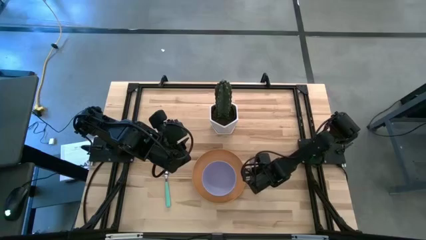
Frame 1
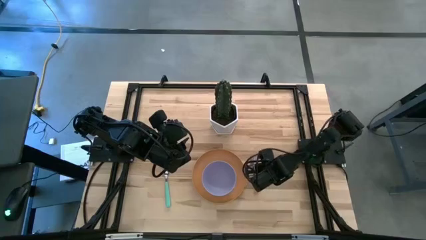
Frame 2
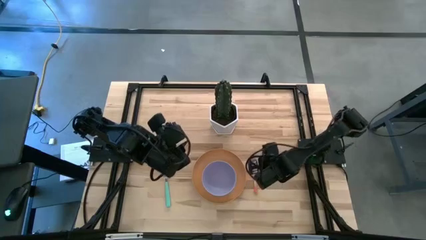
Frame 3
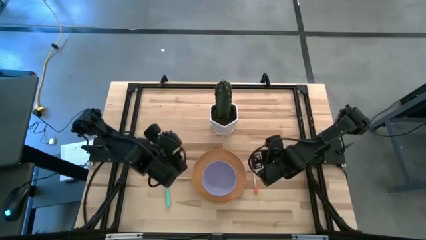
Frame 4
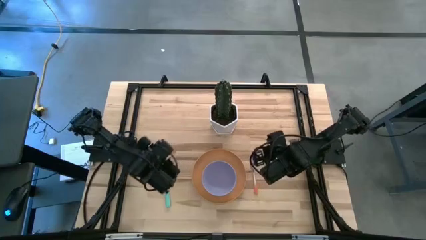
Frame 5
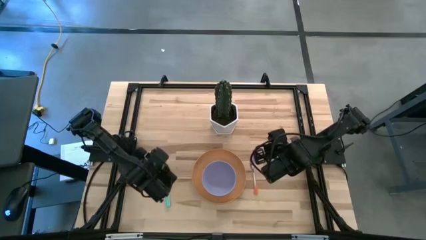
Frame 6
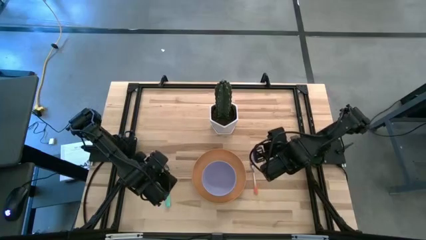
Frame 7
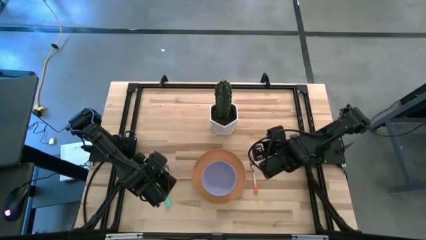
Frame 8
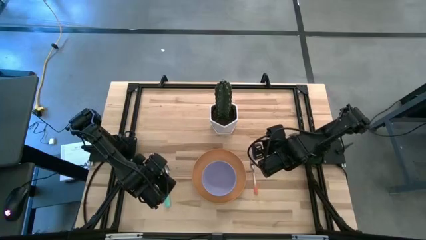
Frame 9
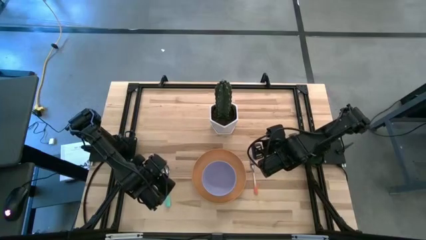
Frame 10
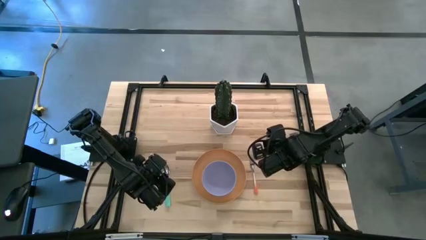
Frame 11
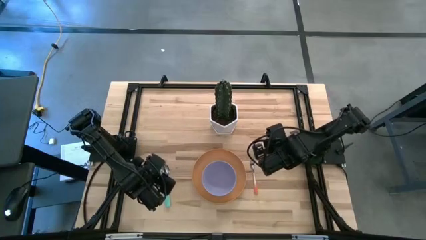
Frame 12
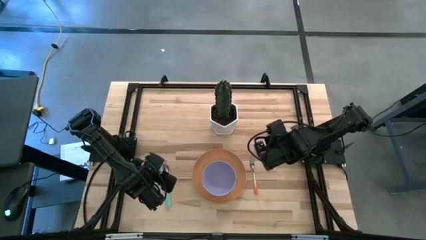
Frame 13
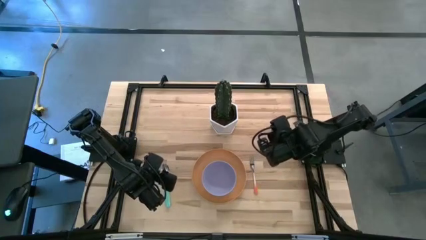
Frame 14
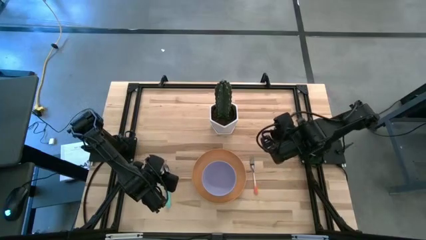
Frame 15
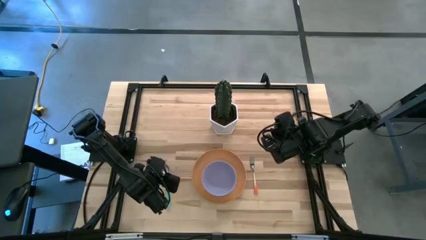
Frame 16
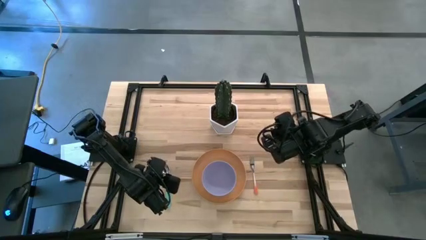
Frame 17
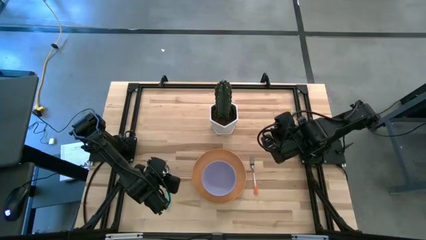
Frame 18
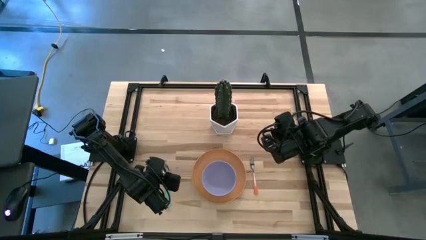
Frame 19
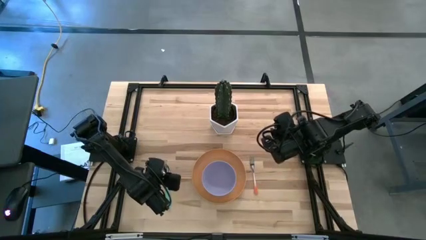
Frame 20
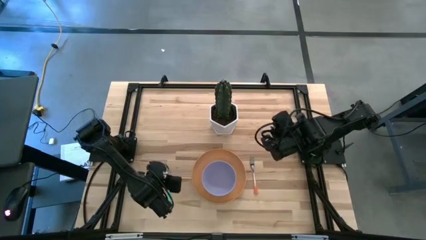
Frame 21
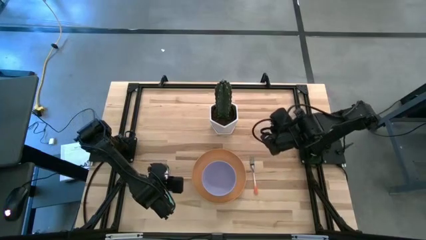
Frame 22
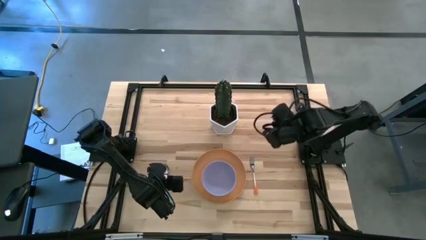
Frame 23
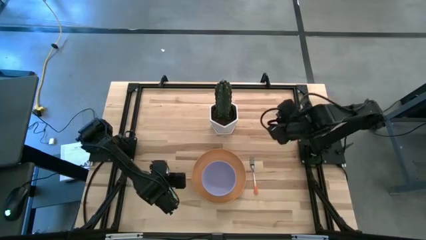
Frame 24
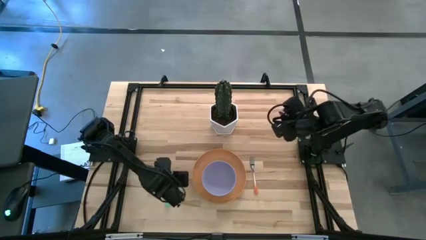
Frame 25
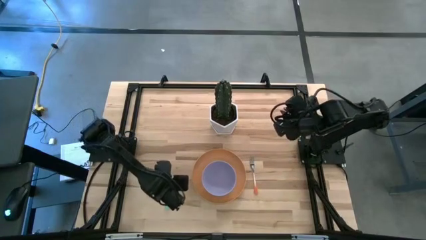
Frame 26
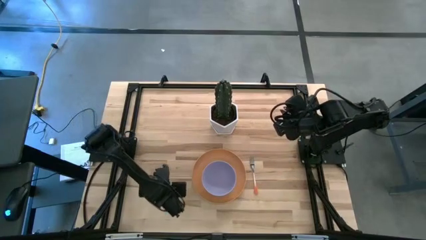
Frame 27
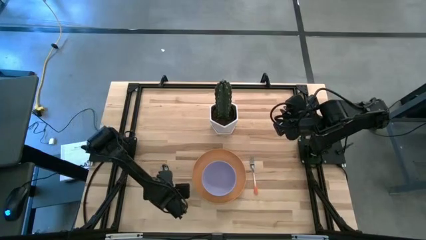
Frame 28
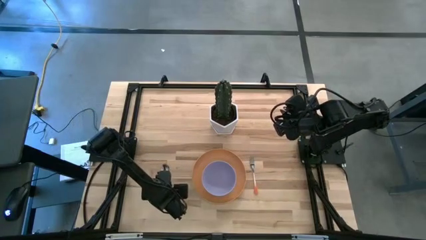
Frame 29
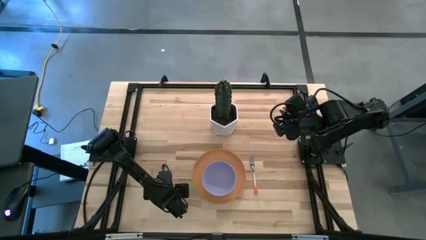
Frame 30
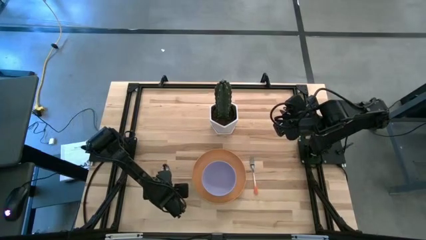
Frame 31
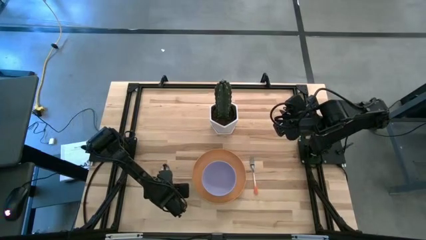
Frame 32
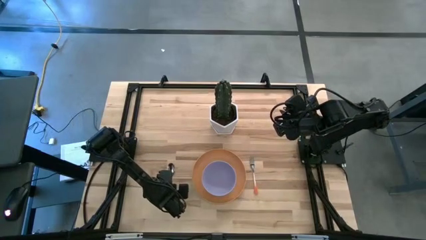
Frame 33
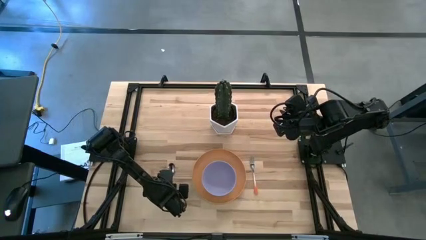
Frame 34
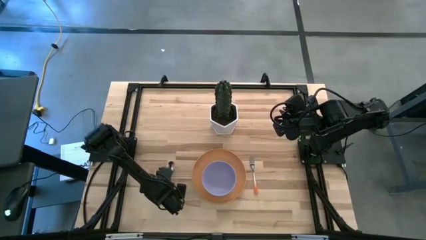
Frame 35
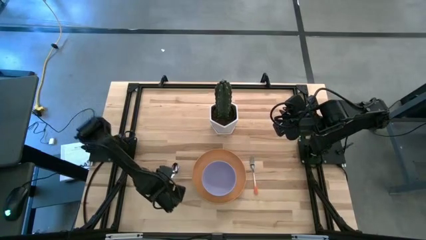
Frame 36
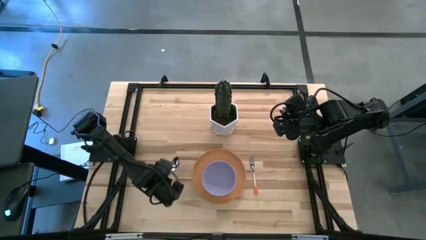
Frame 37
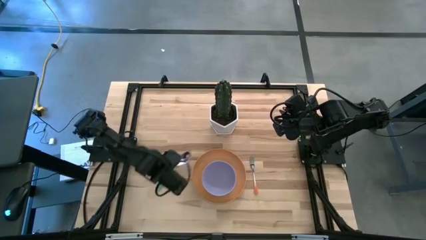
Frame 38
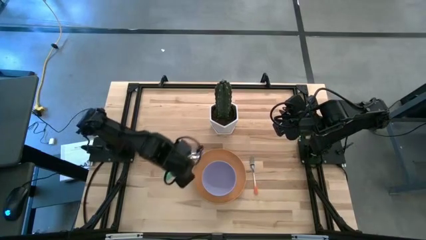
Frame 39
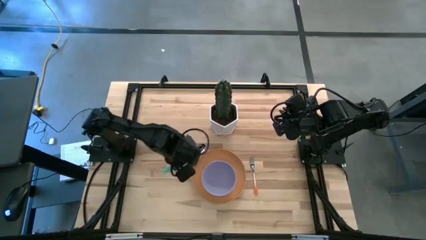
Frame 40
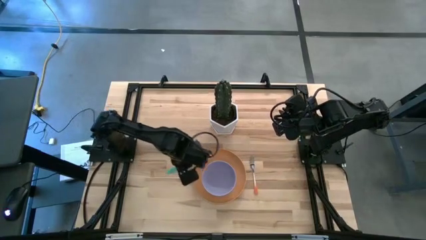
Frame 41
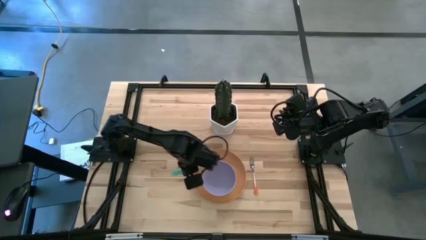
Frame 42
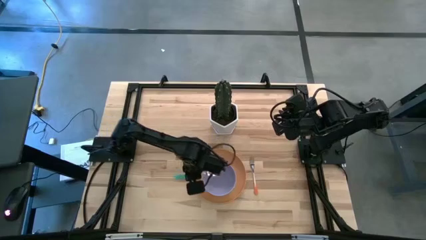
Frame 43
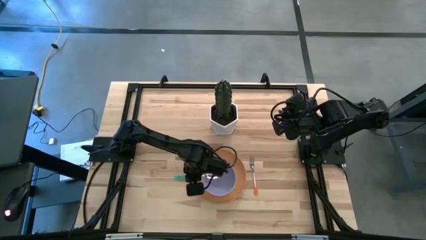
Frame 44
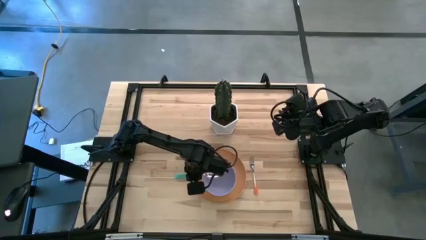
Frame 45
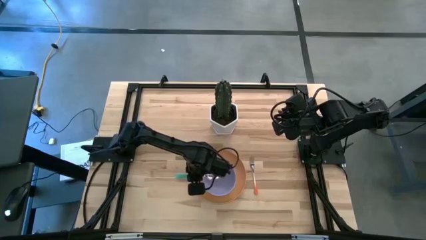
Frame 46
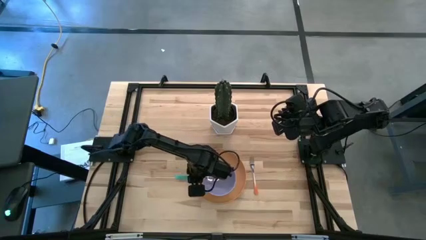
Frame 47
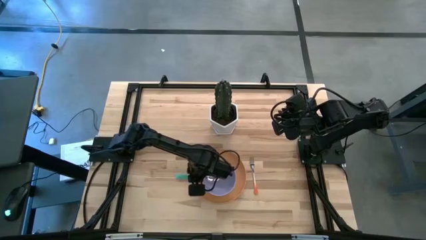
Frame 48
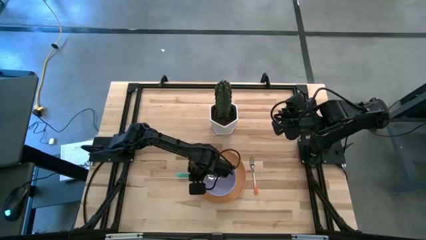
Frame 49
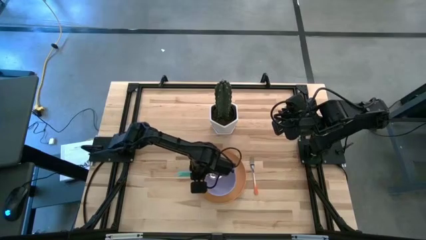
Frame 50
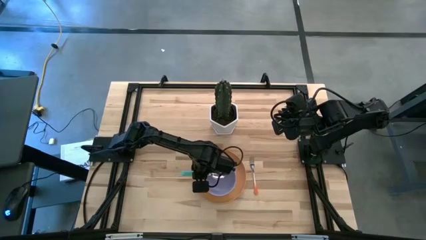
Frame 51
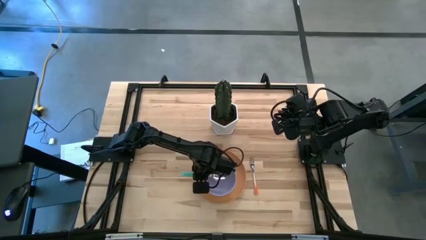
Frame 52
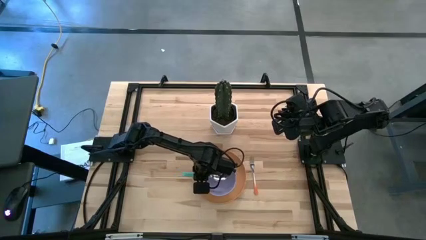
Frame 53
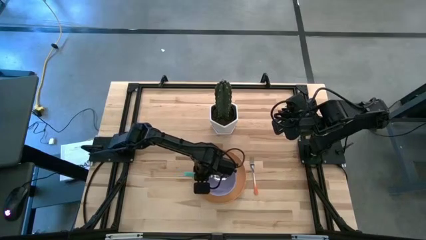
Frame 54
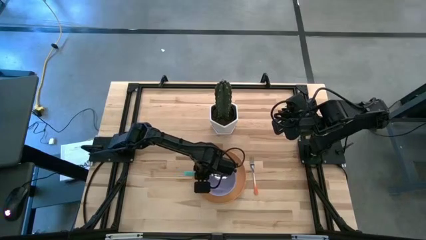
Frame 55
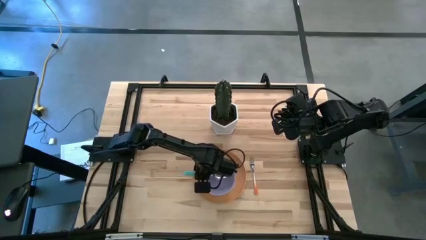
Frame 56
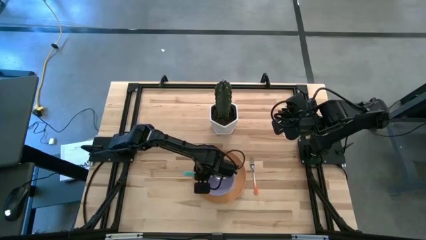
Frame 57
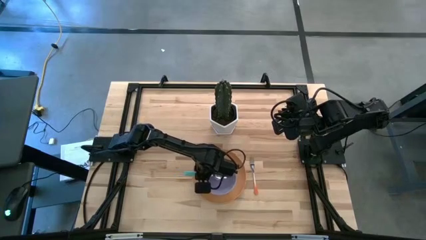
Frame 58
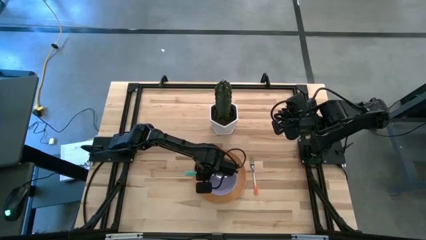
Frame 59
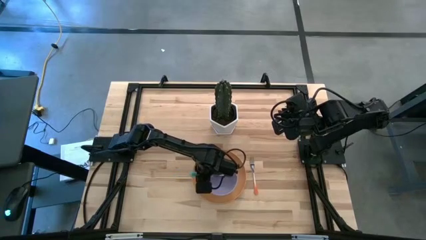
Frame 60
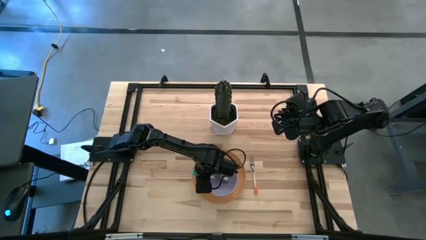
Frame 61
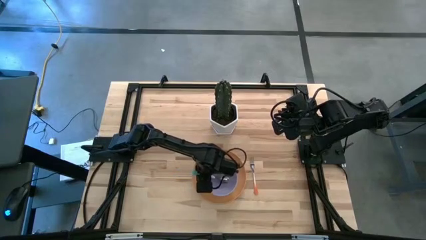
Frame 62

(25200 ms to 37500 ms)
Task: Set table place
Put the blue spoon into the purple bowl
